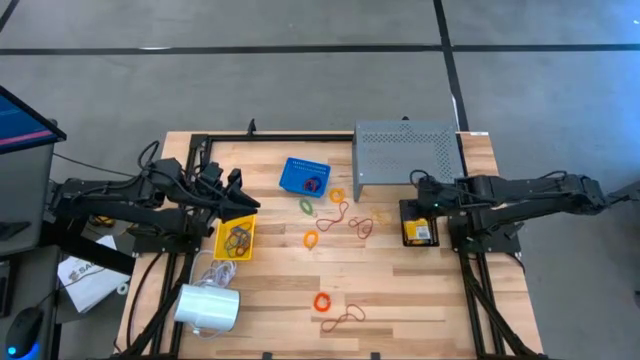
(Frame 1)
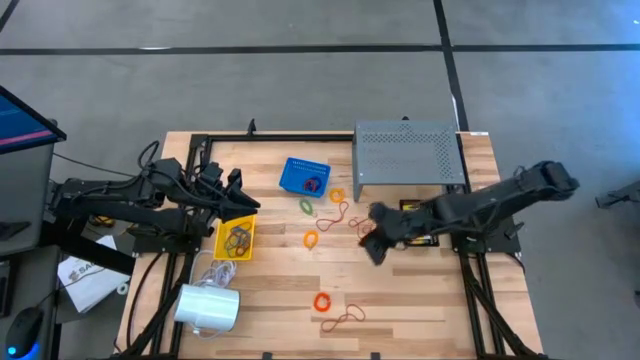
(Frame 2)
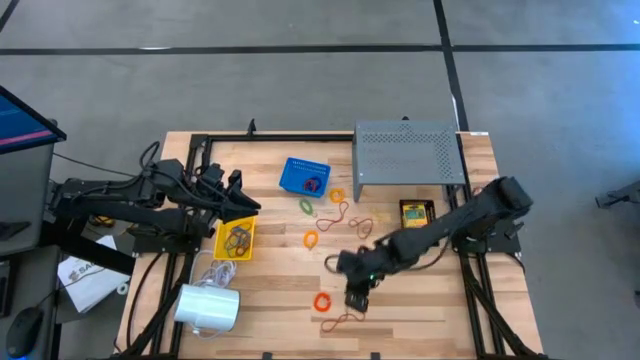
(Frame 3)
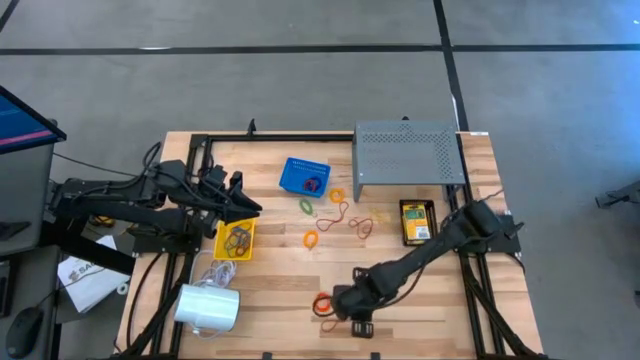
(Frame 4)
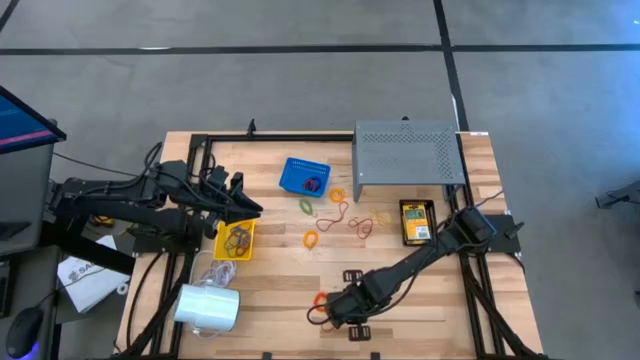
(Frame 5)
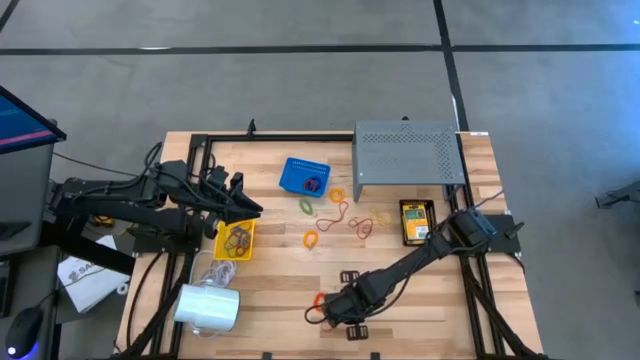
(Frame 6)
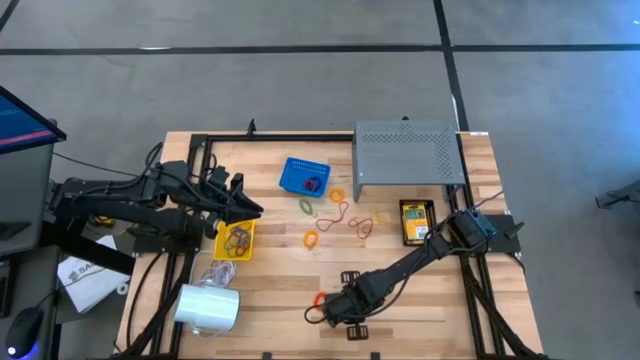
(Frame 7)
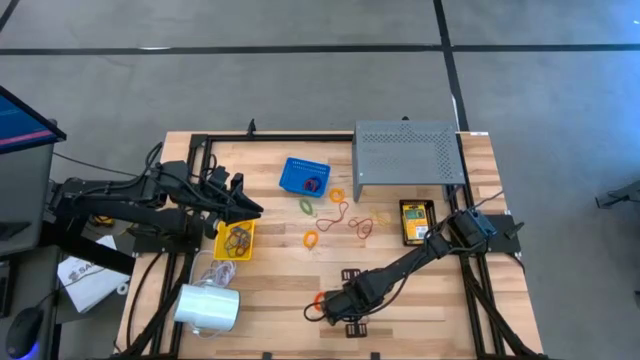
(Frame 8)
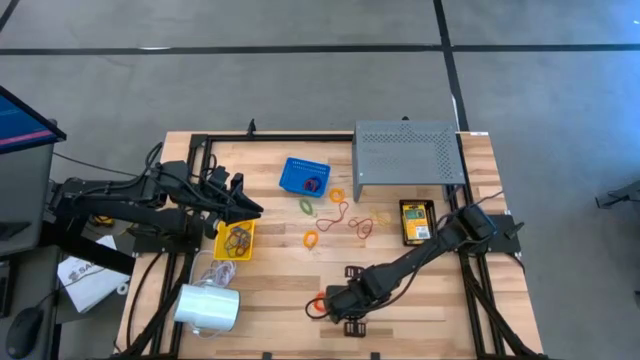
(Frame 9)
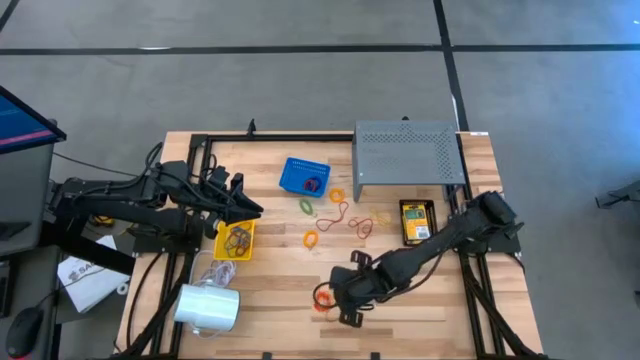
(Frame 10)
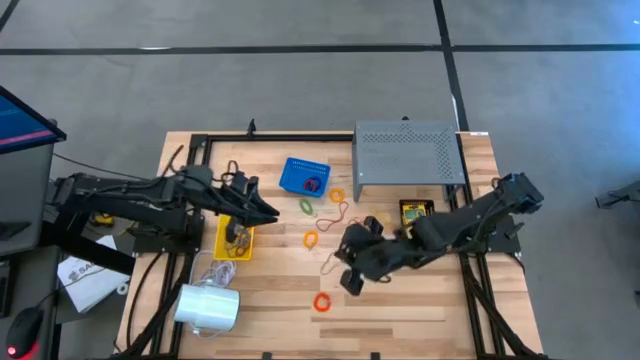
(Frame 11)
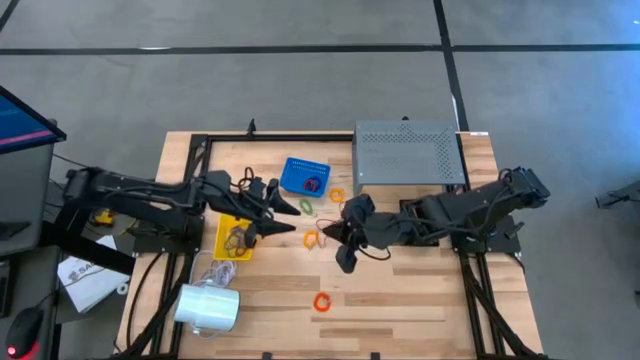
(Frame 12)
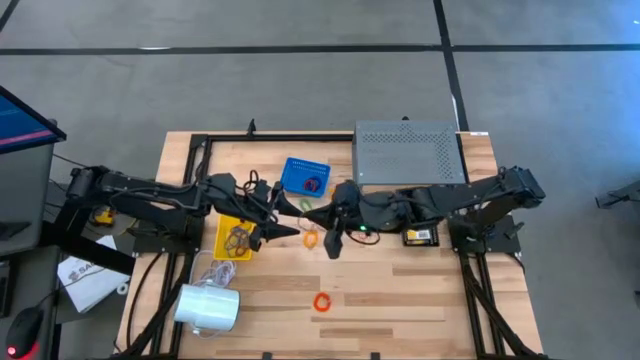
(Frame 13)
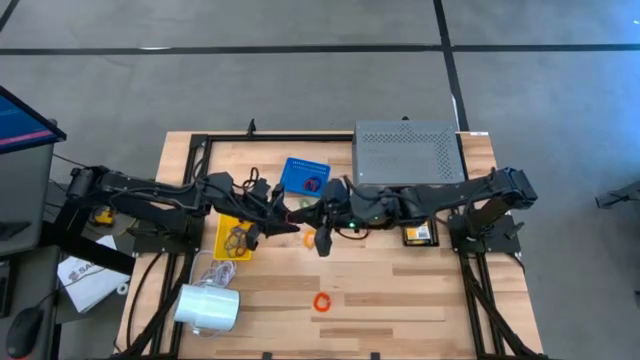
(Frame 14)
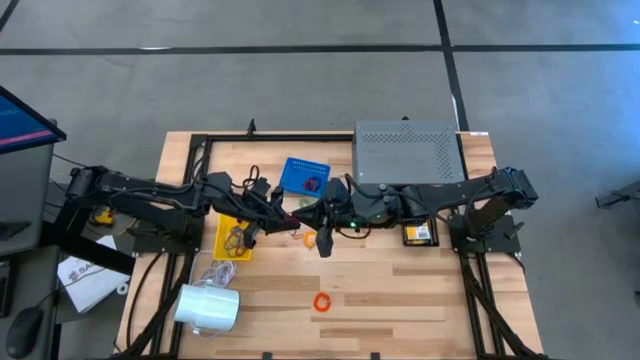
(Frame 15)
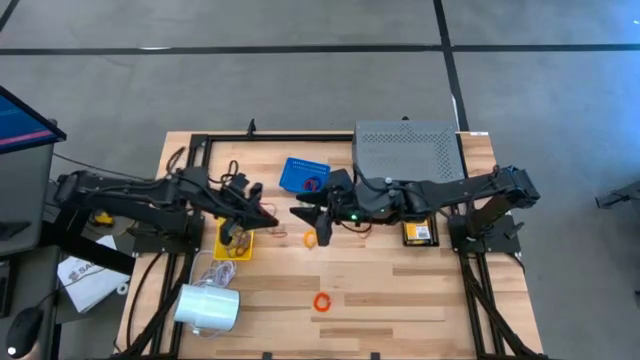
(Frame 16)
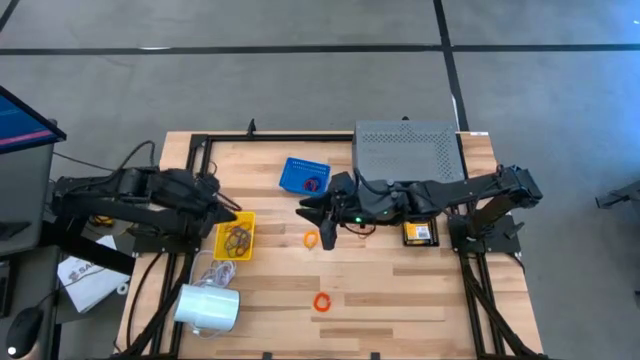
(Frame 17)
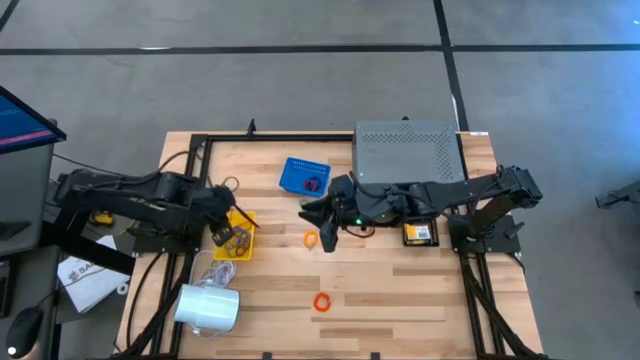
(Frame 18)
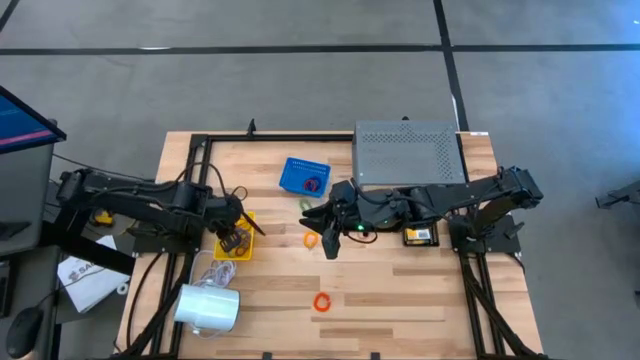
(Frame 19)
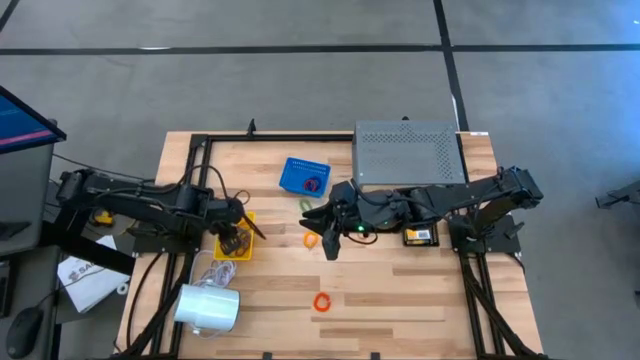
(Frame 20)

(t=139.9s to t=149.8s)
Task: Pick & Place Office Desk Supplies
Put the red rubber band into the yellow bin

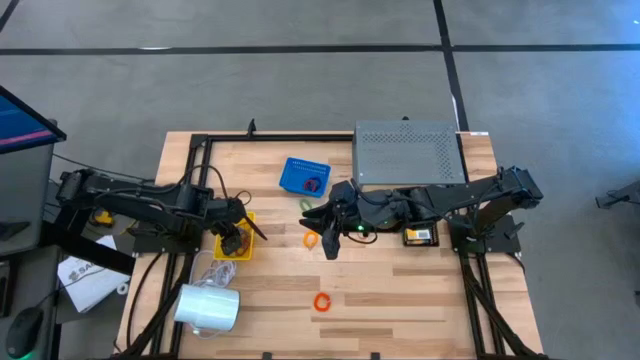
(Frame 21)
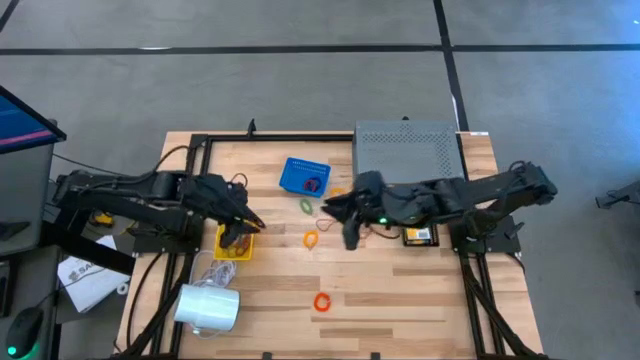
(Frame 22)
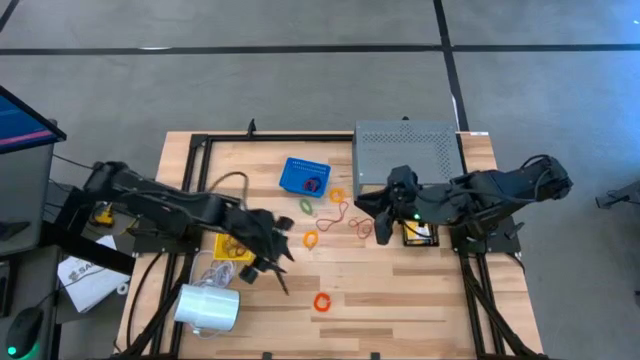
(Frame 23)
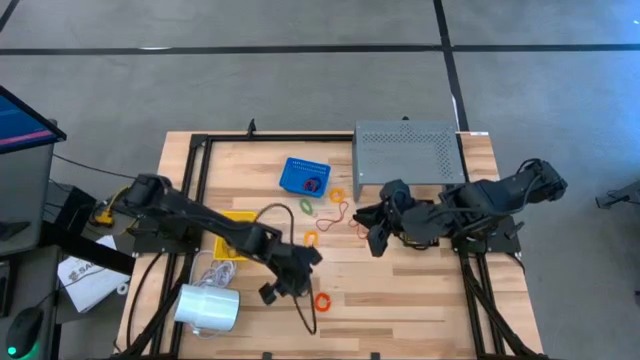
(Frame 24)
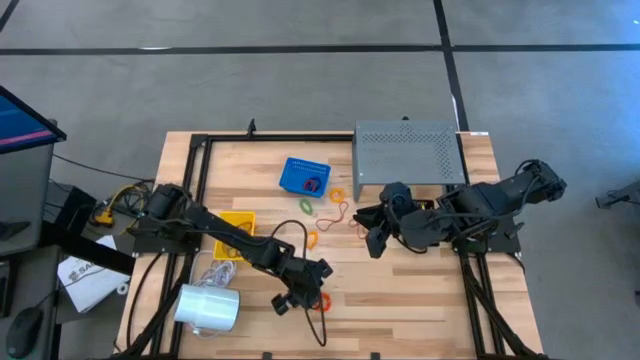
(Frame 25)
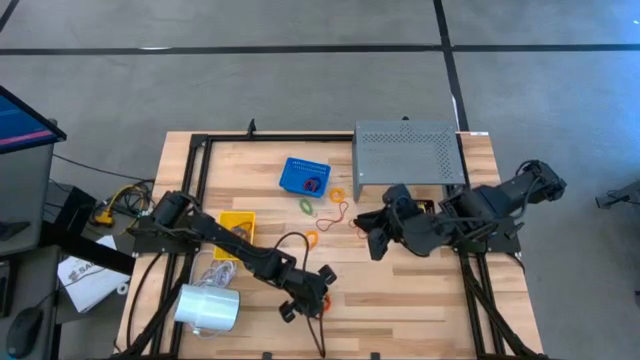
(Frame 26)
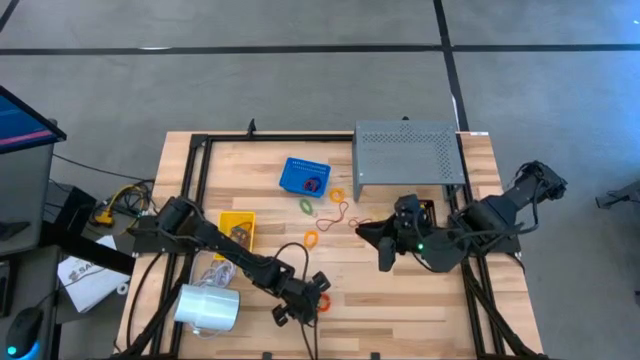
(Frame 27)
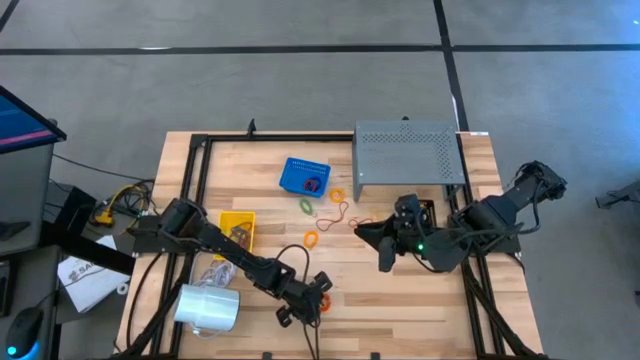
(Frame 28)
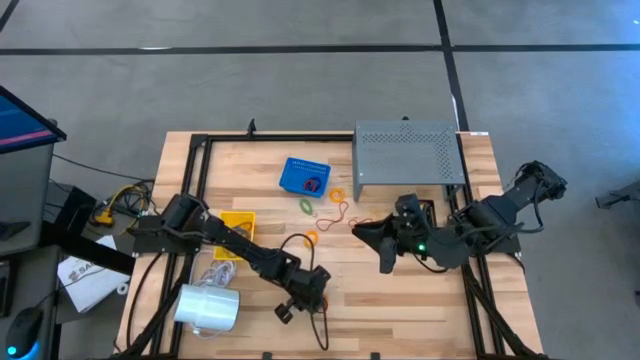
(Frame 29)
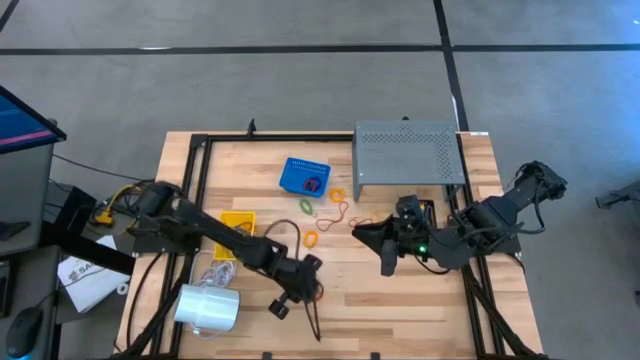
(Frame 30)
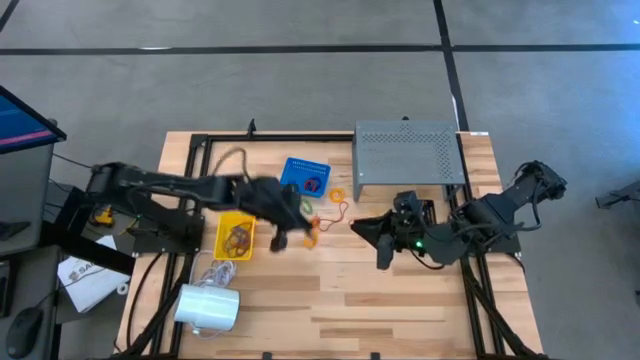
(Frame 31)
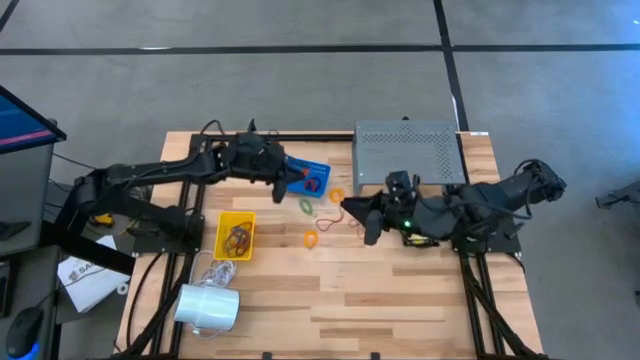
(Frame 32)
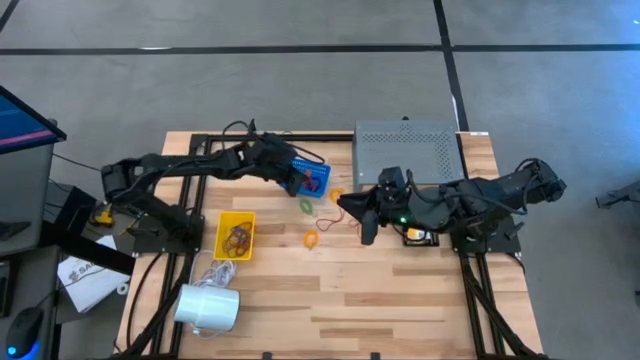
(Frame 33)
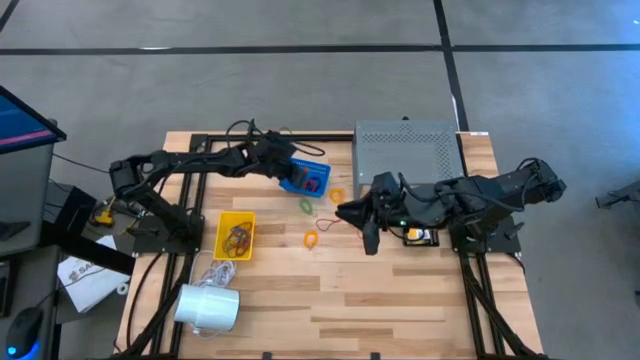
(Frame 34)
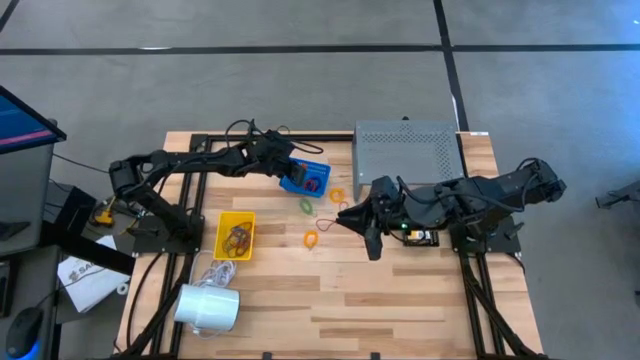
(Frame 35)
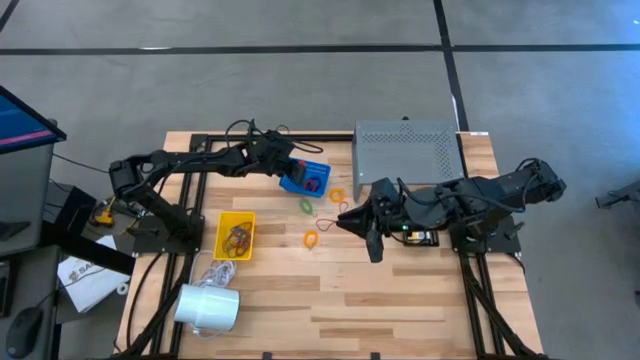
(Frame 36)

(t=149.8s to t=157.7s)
Put the orange spring keychain into the blue bin

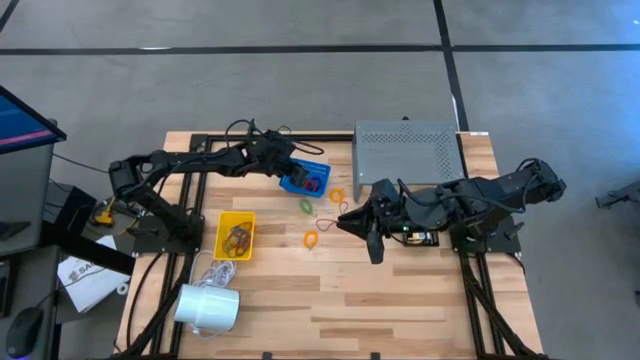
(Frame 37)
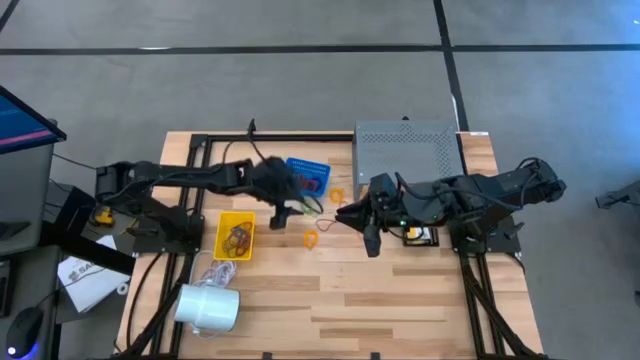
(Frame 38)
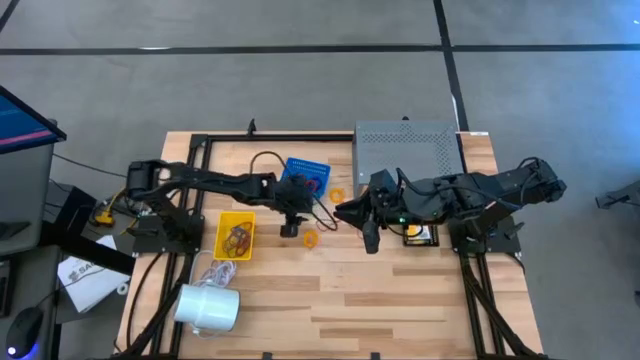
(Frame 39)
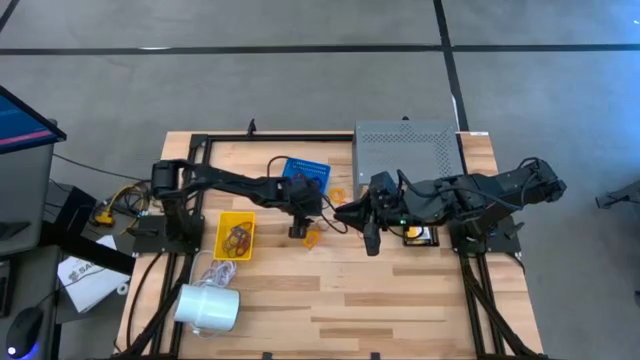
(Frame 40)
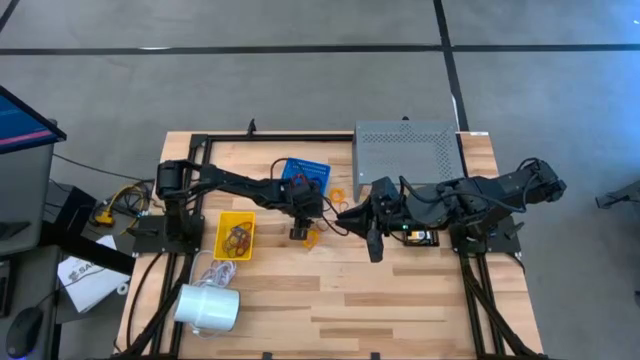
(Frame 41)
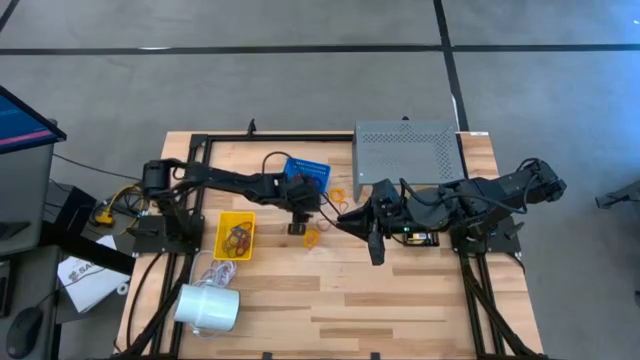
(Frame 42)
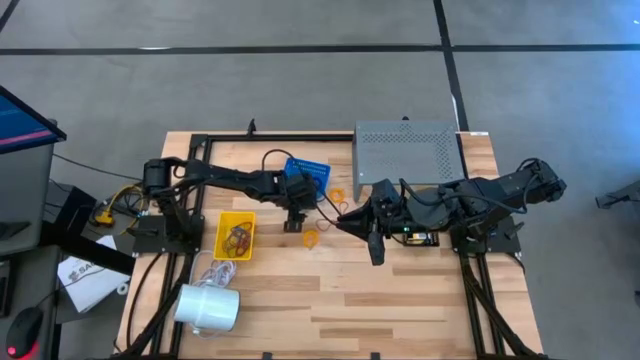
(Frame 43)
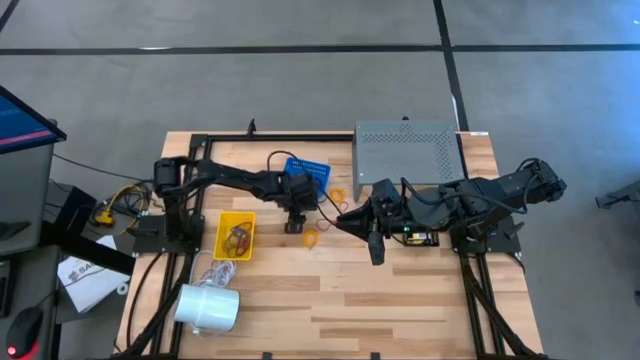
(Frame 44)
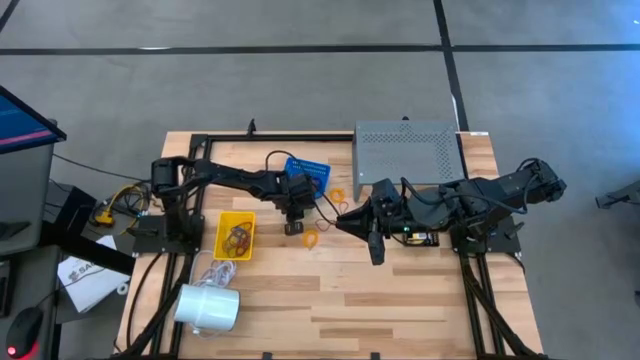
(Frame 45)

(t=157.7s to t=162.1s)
Put the green spring keychain band into the blue bin
